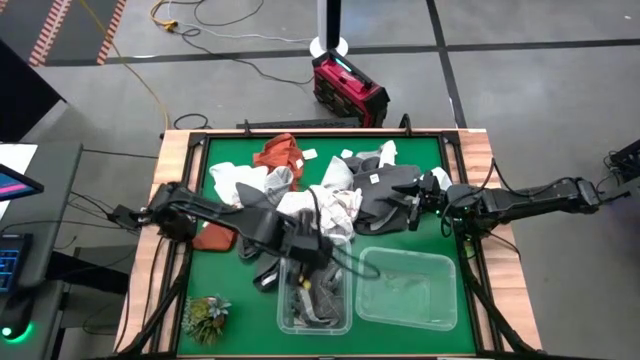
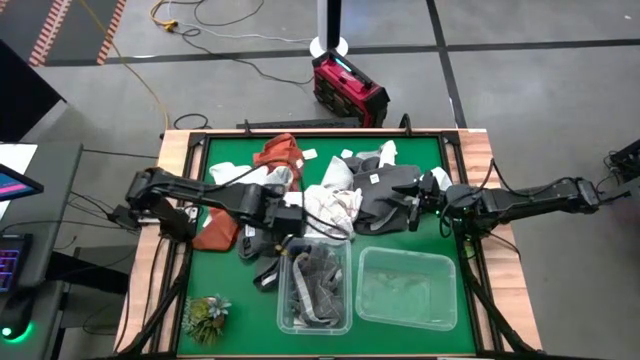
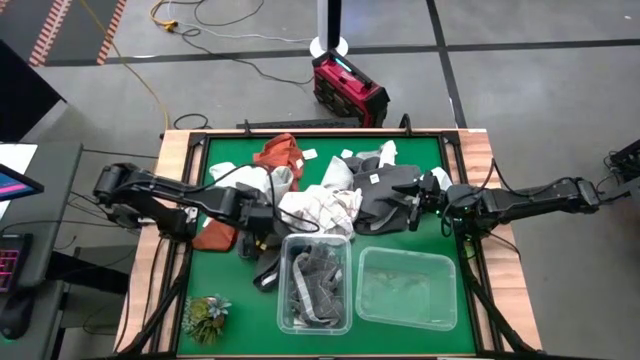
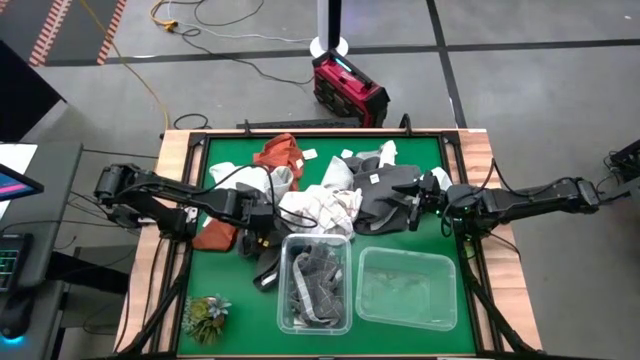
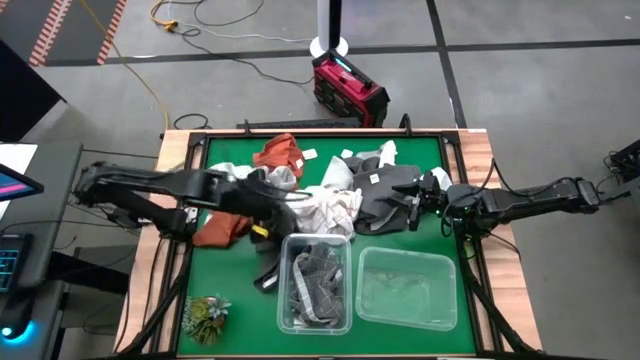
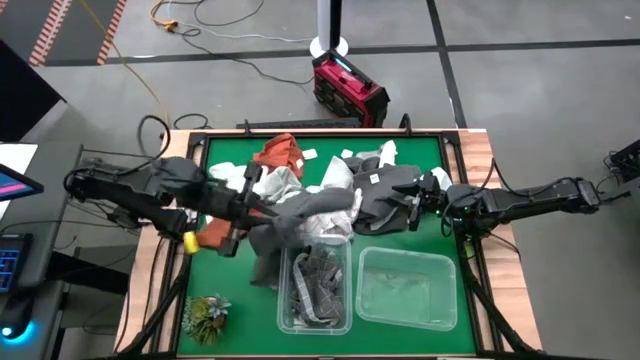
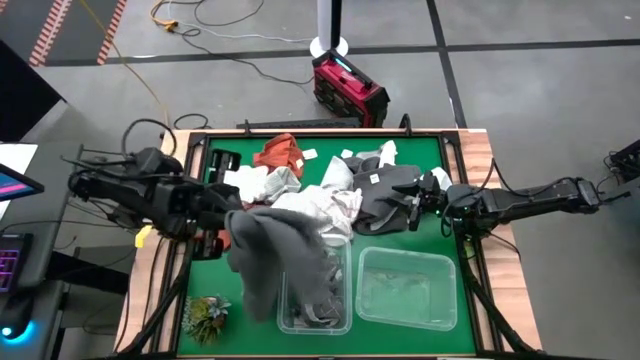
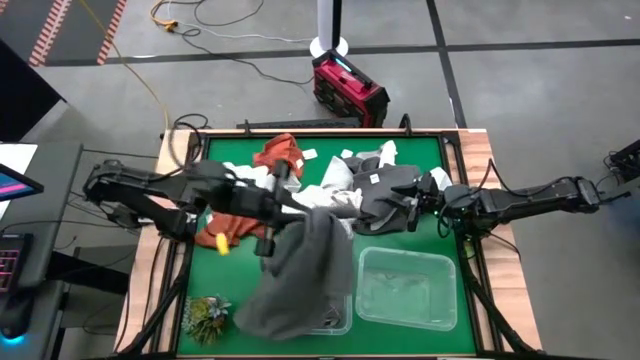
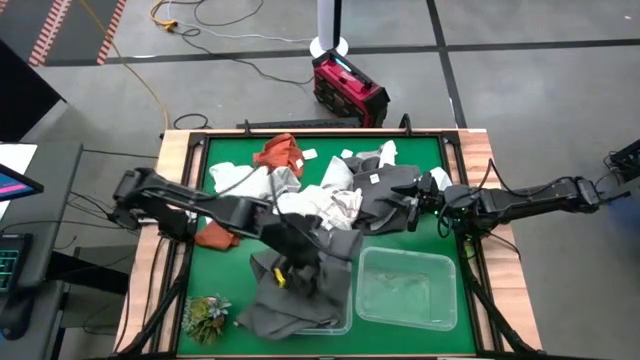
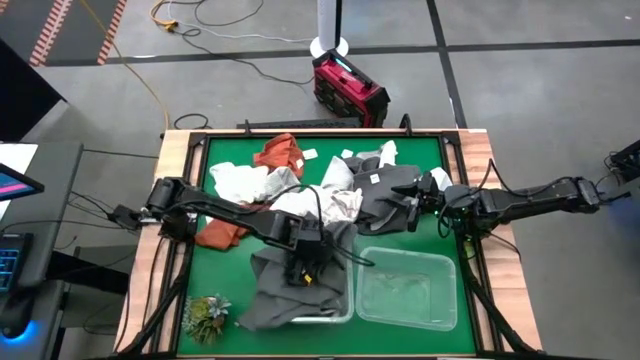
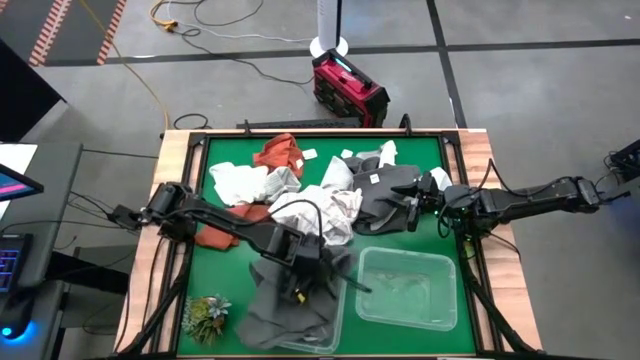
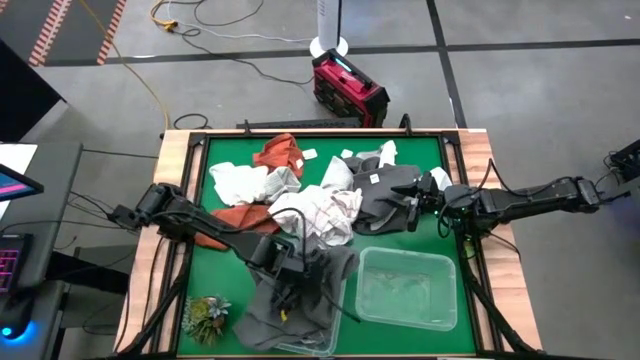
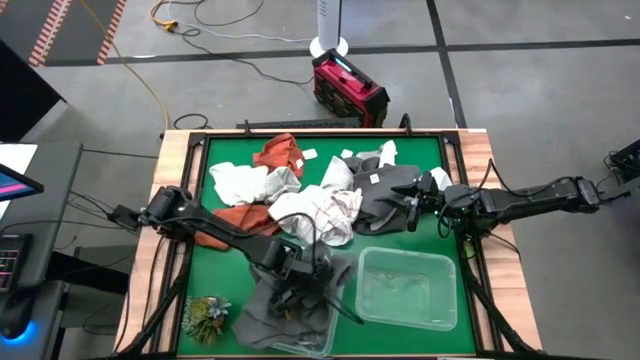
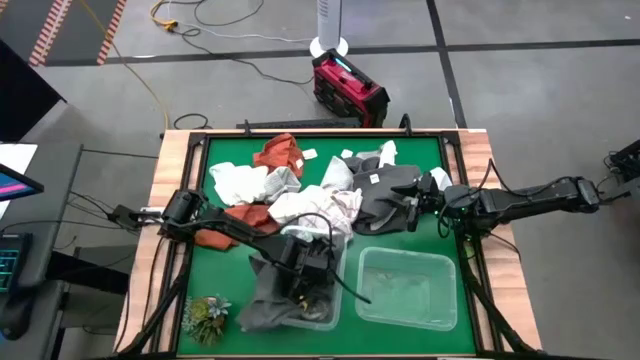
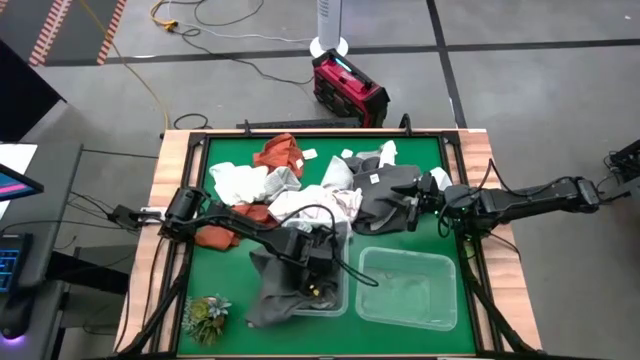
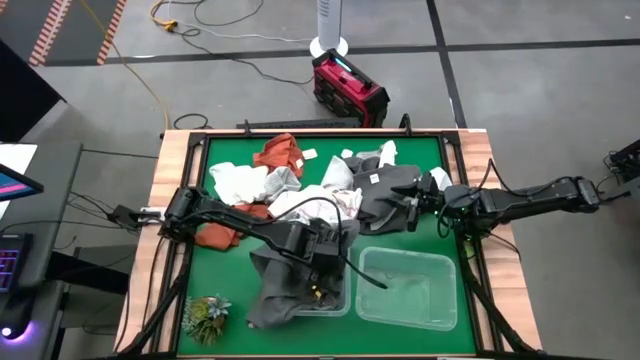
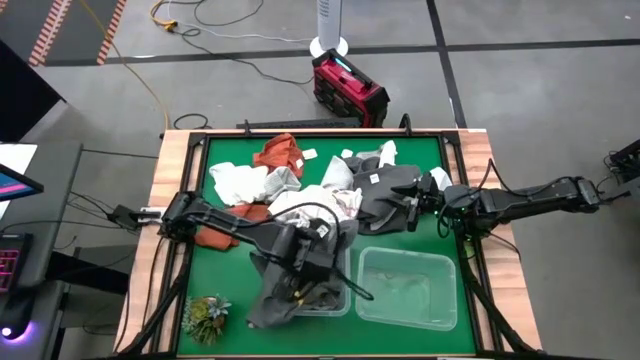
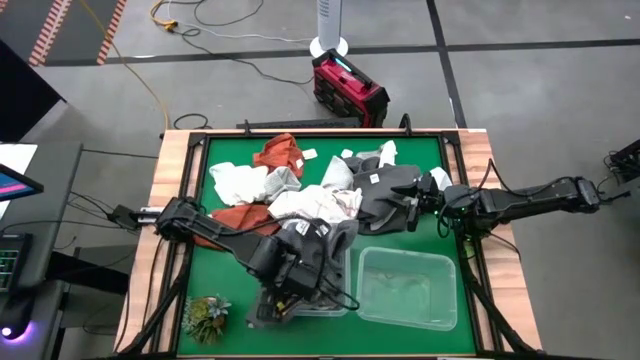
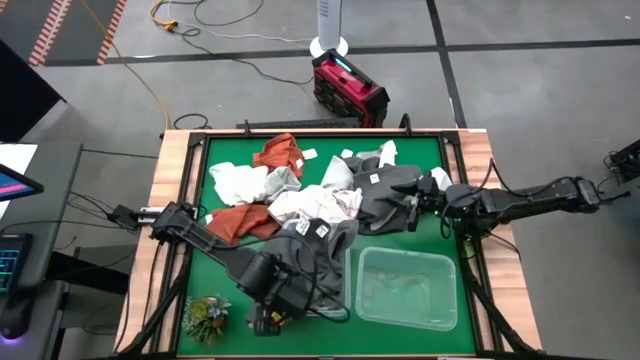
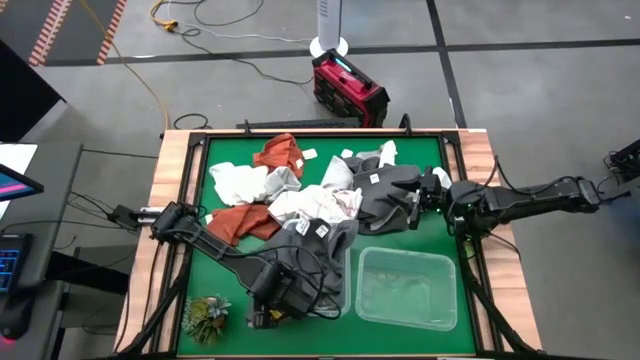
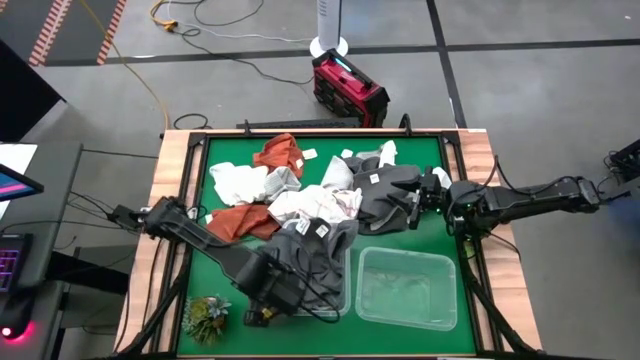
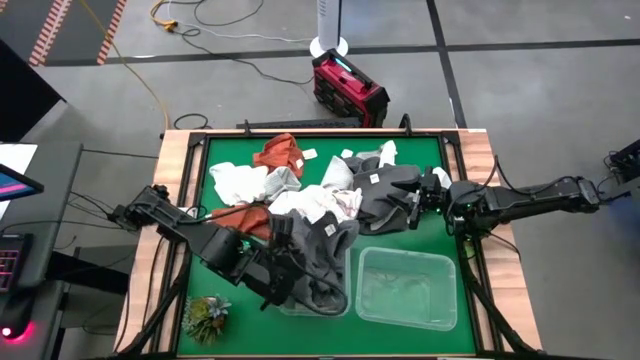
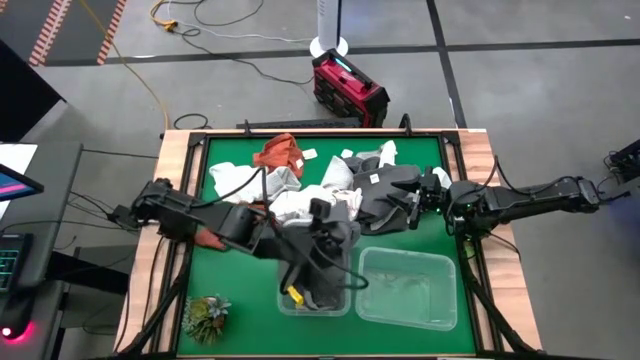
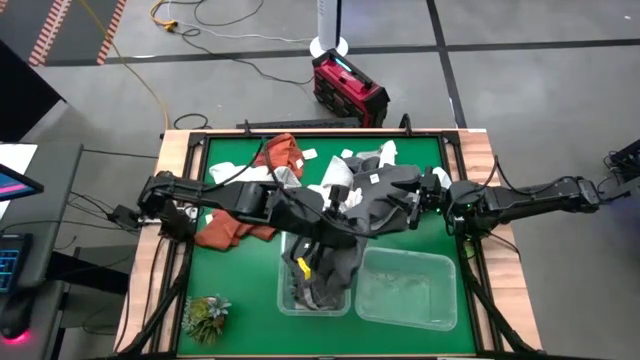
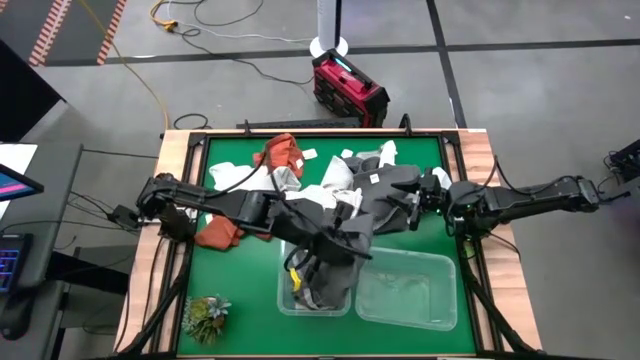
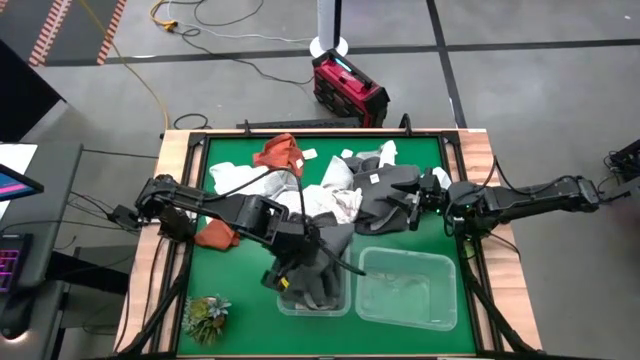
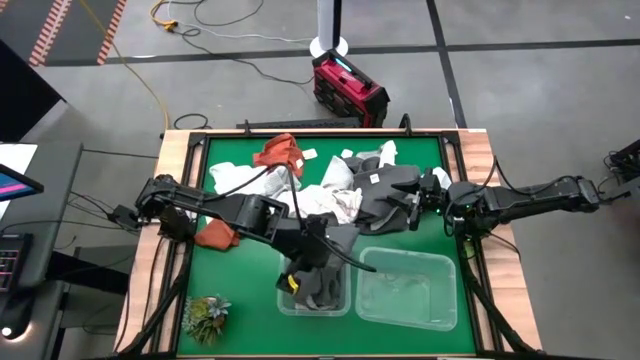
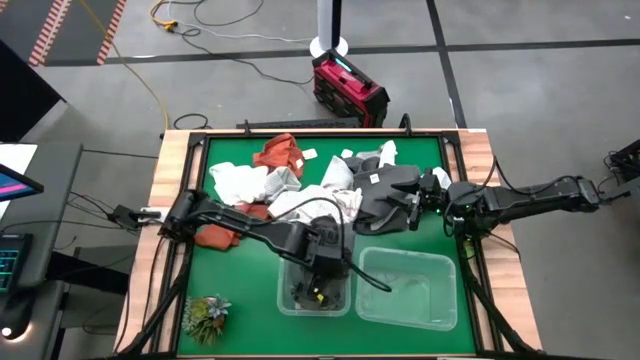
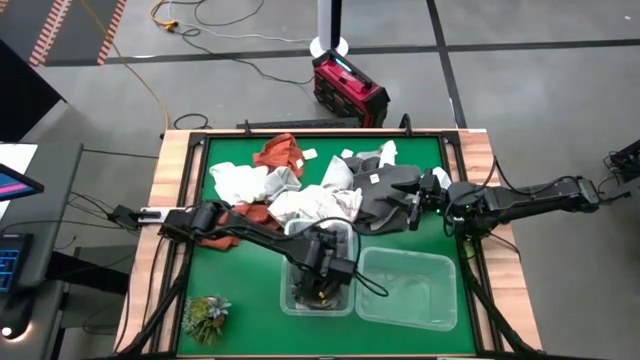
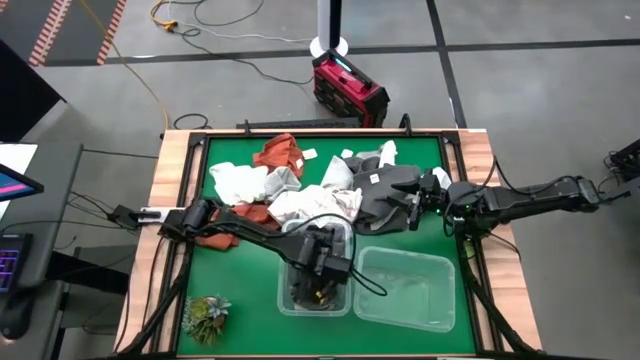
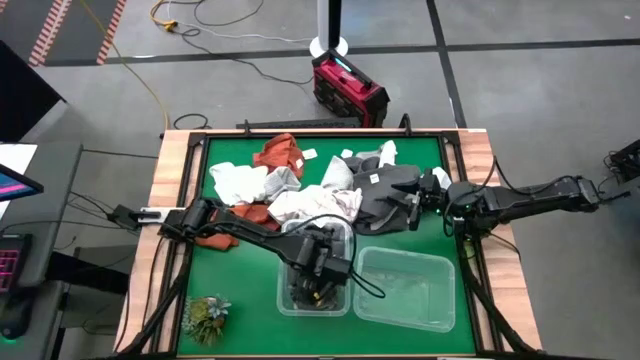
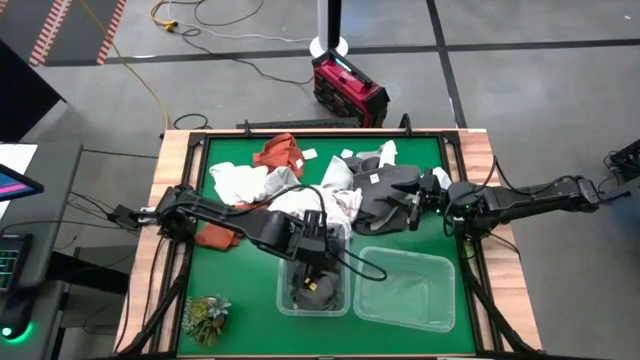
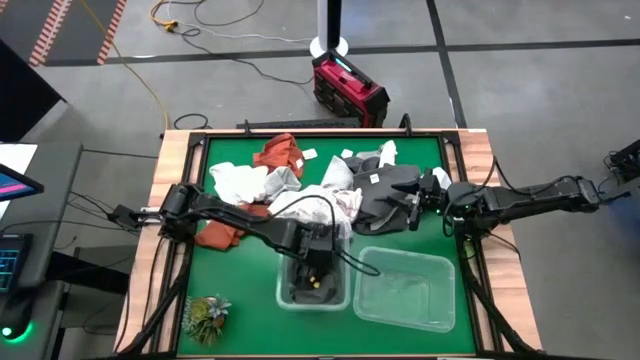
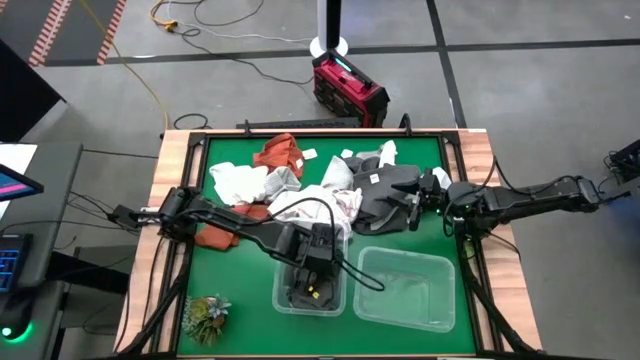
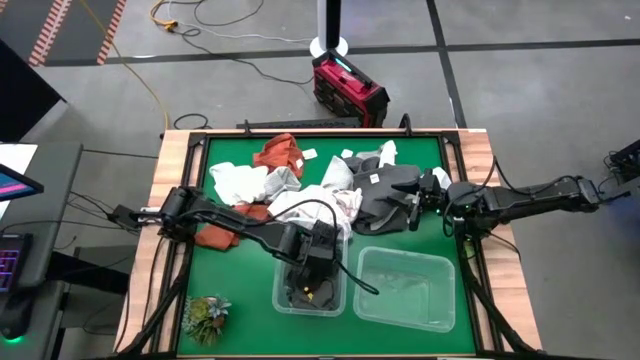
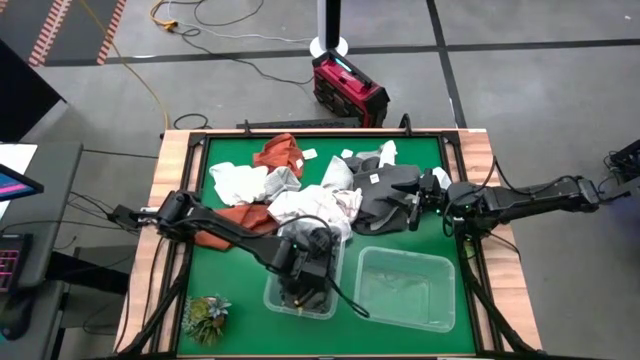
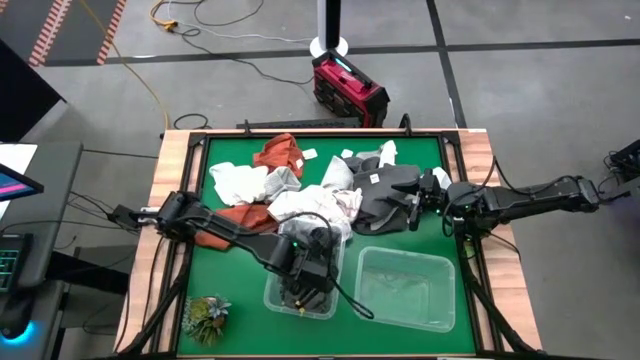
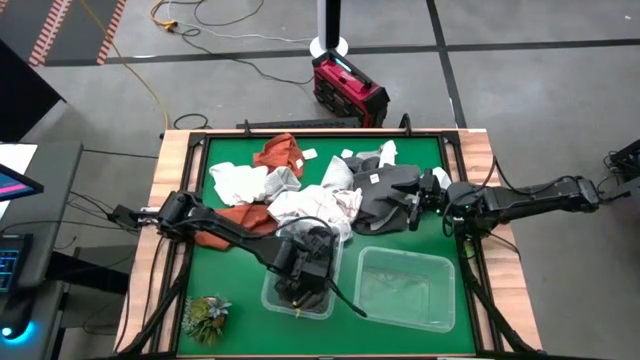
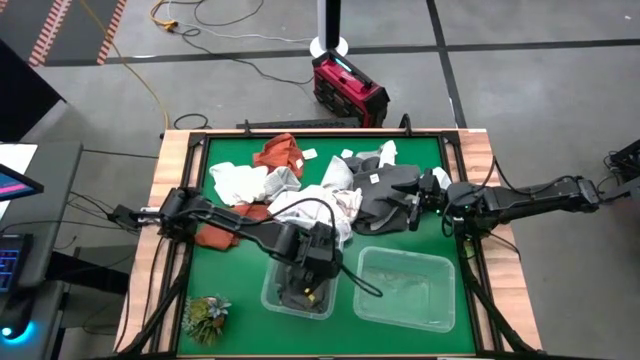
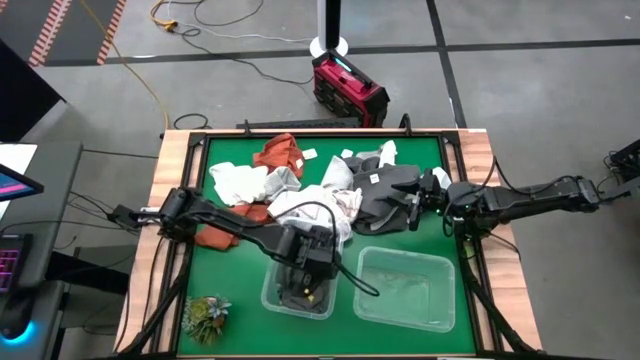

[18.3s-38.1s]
Task: Sort towels by color in basket
Put the left dark grey towel into the left transparent bin

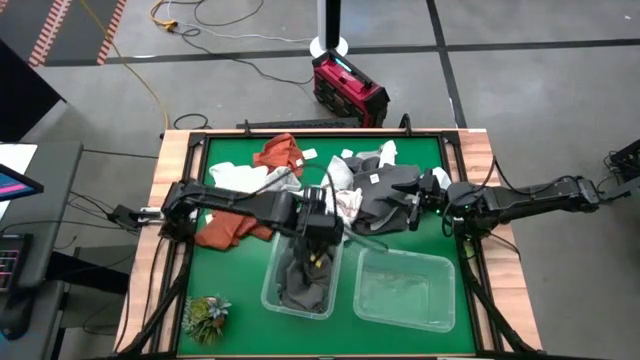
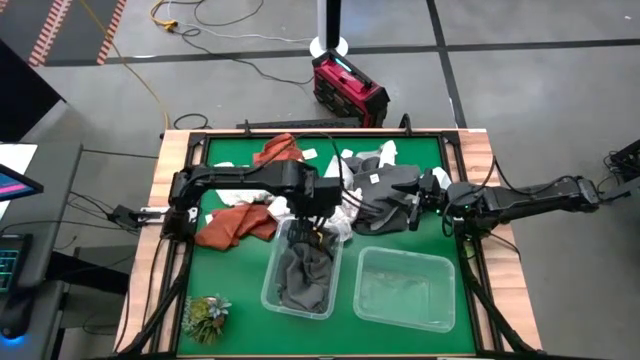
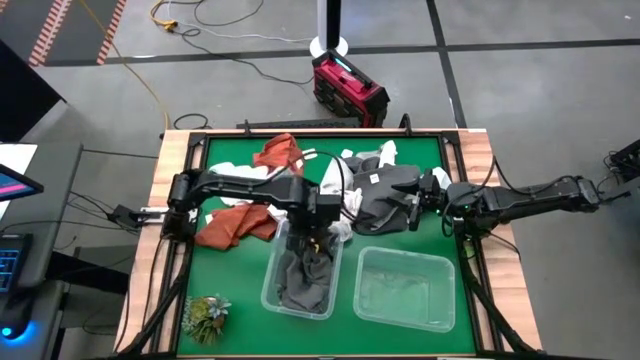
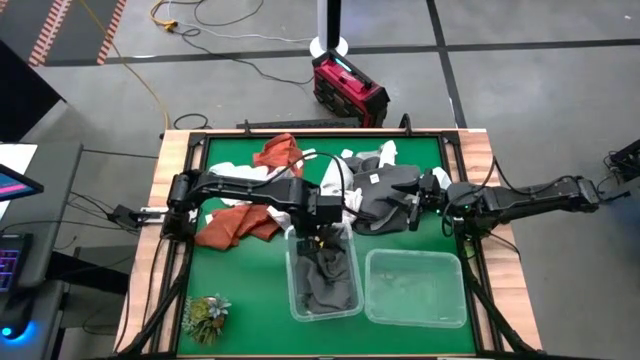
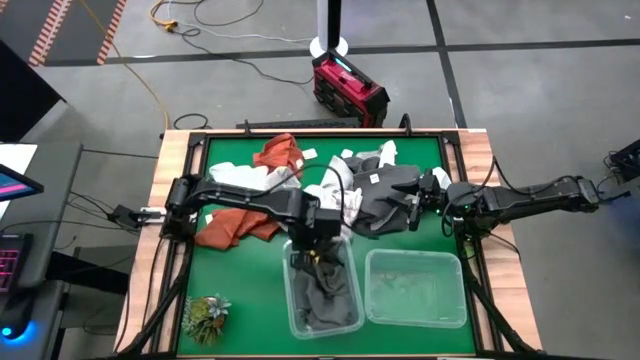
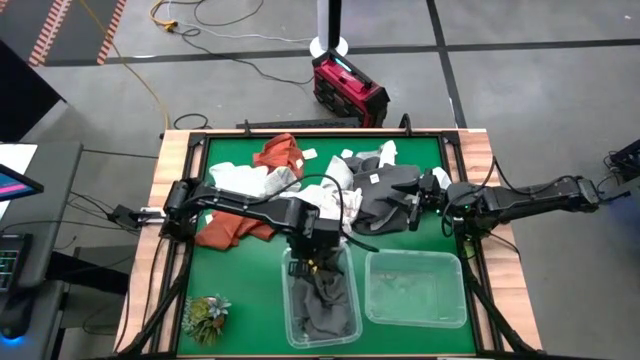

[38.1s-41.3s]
Adjust the left transparent bin
